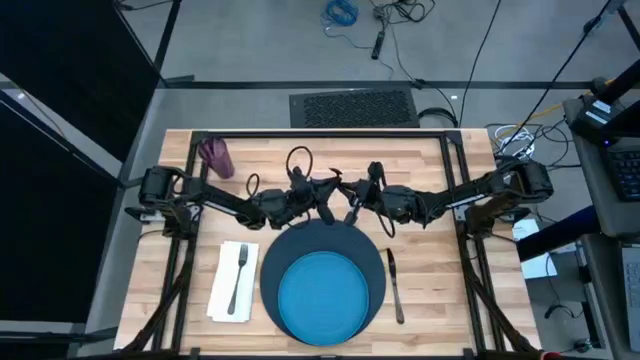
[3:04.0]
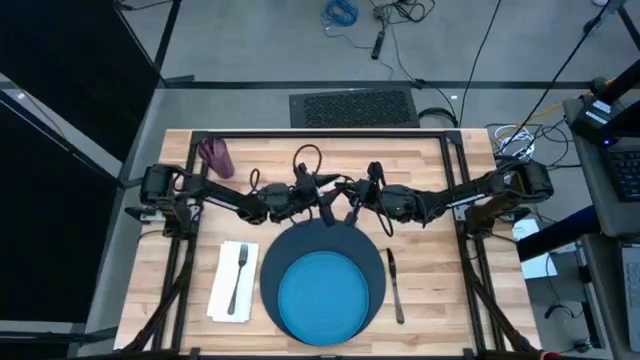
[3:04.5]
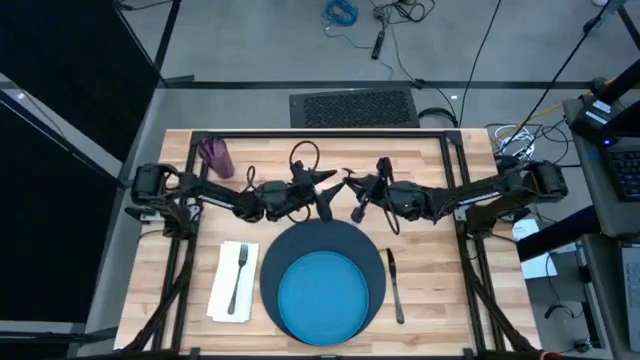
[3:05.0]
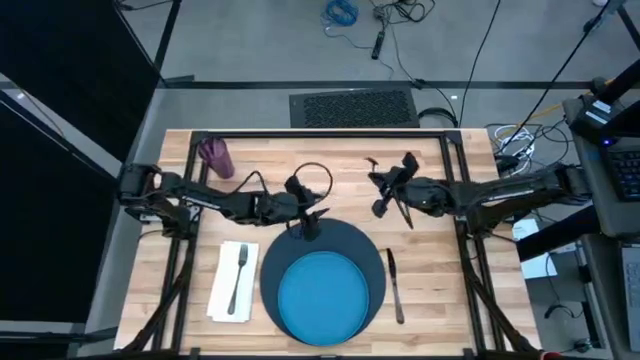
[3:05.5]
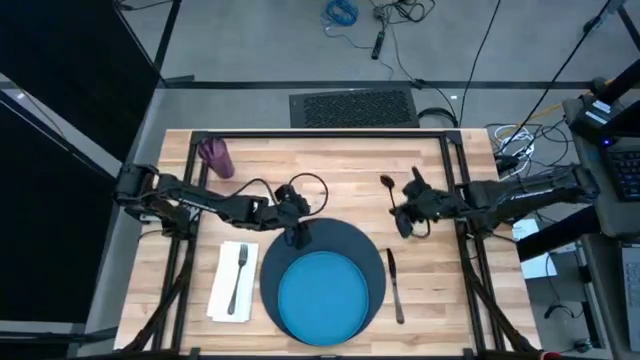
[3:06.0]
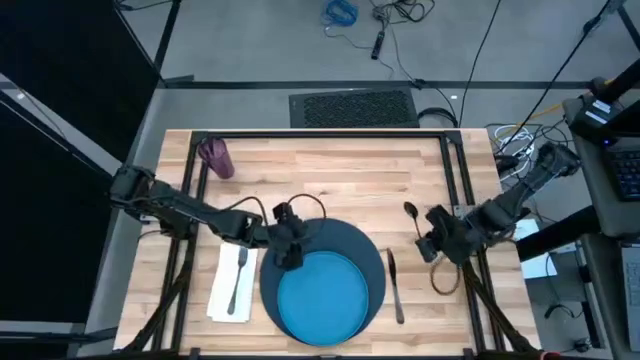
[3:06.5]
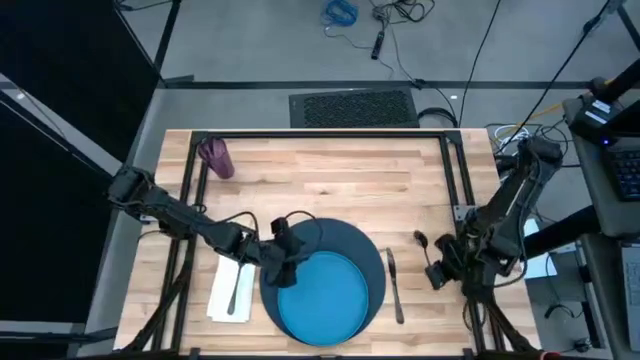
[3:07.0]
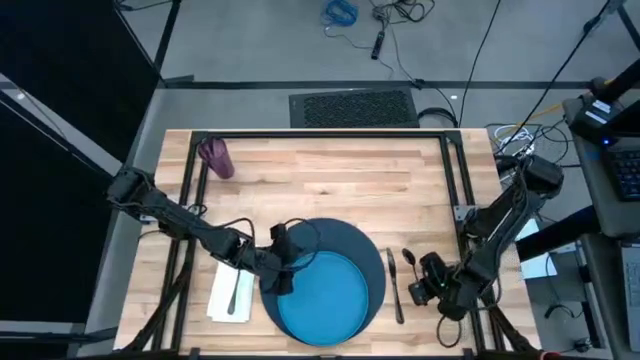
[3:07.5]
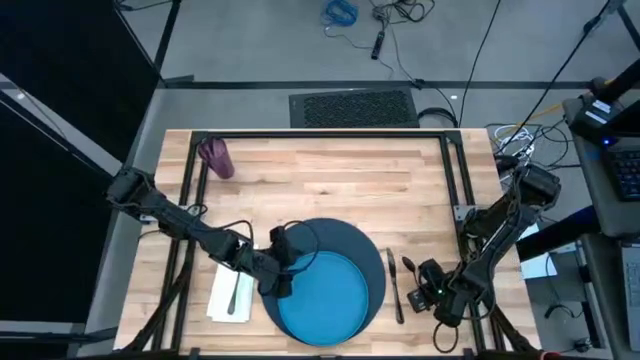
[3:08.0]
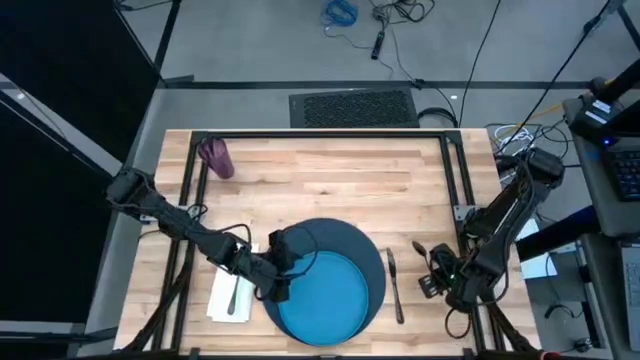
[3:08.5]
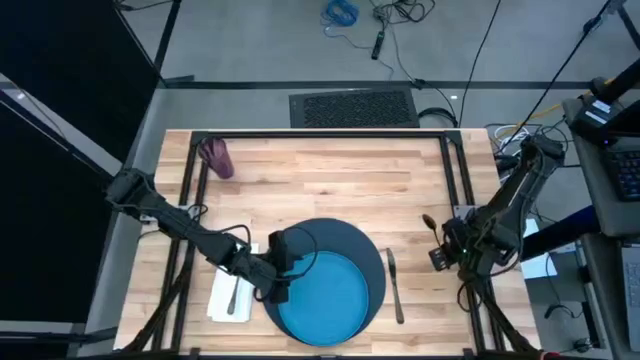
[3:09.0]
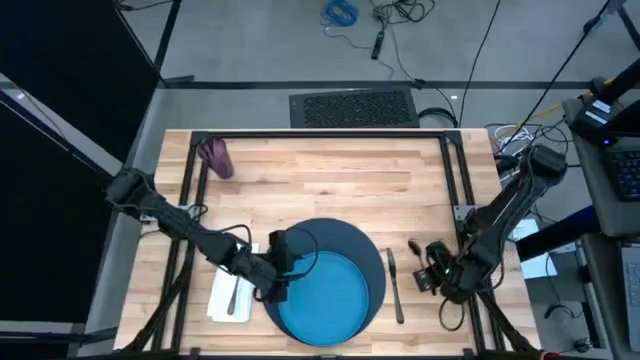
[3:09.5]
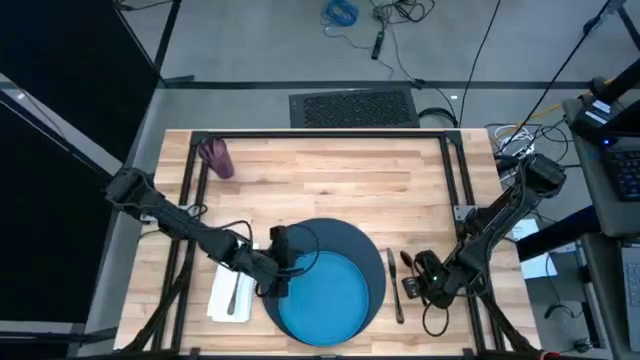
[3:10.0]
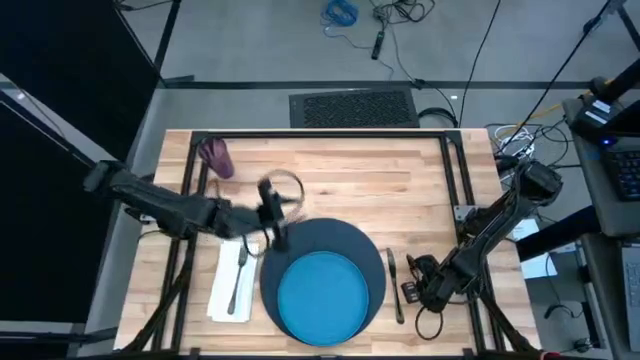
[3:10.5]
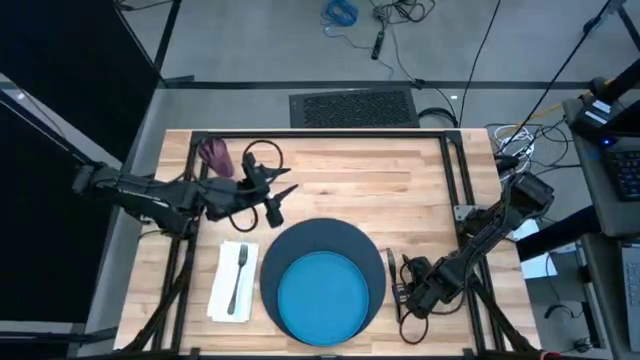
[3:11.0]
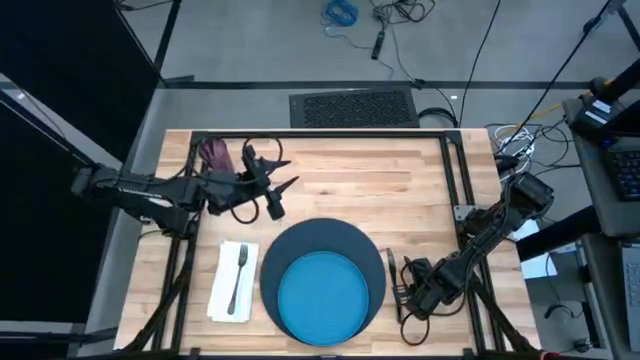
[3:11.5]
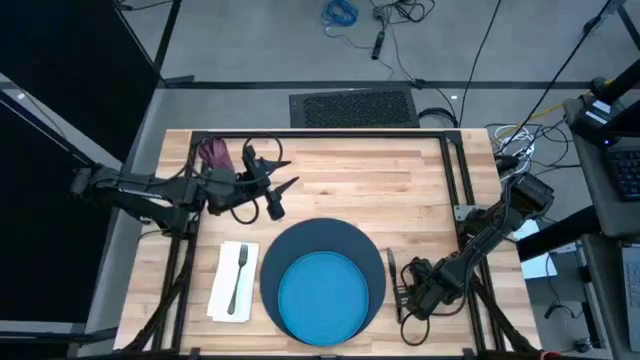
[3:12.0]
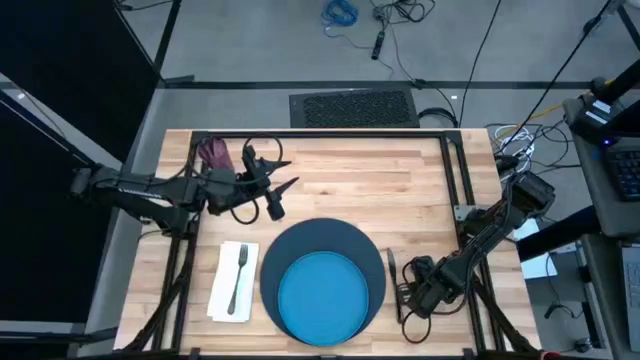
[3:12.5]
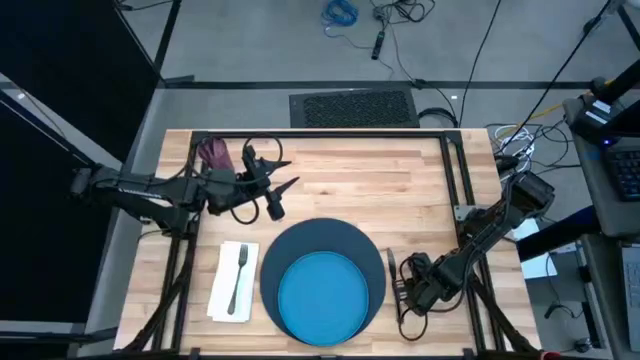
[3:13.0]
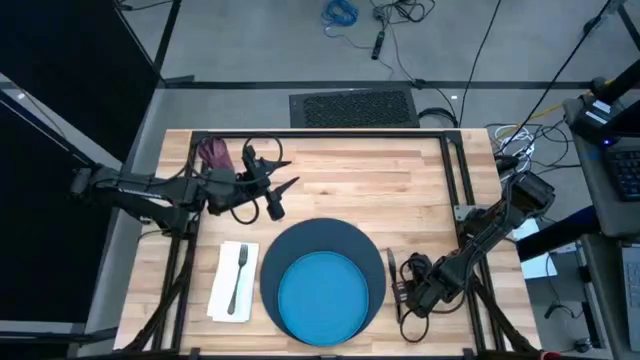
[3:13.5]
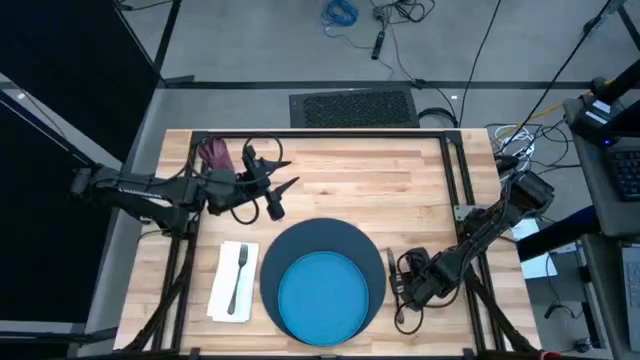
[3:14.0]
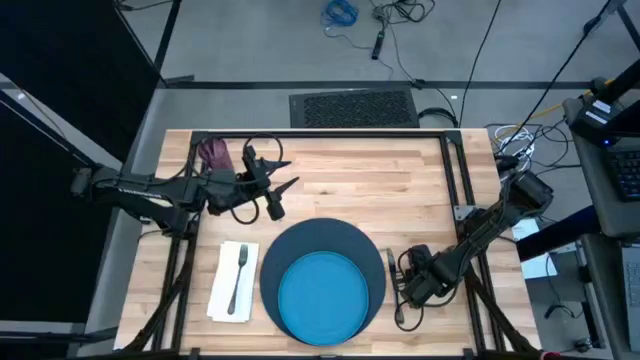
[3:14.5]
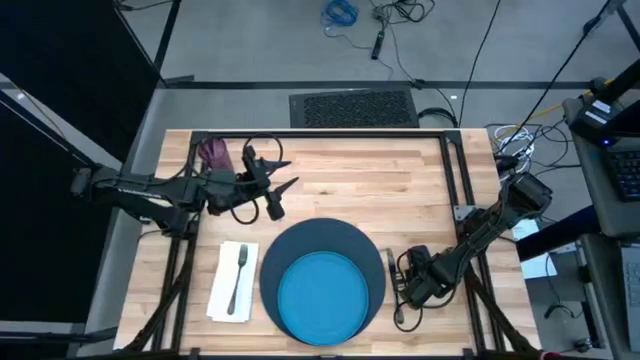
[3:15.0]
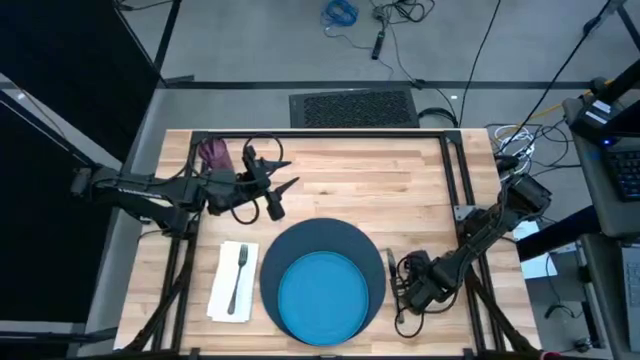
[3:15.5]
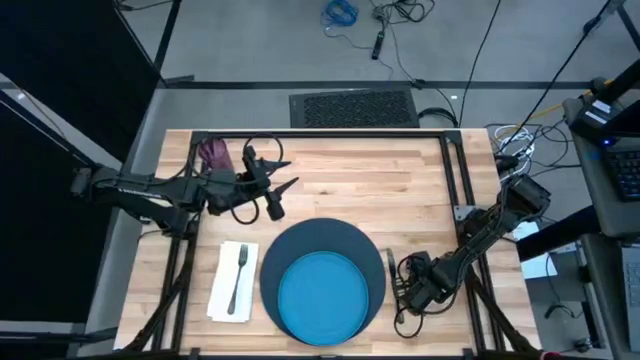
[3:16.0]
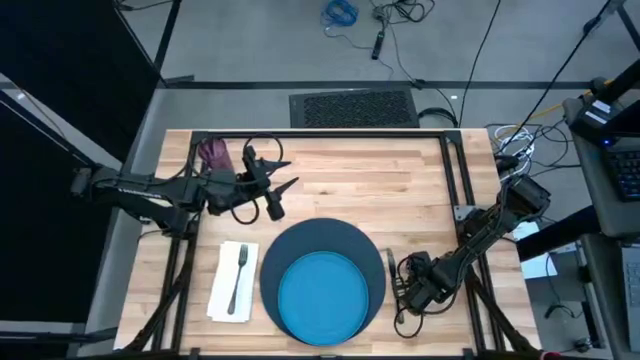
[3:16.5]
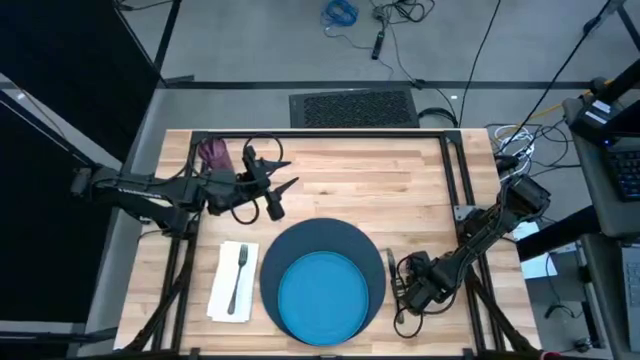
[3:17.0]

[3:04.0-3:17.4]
Task: Set table place
Put the spoon on the right side of the table knife

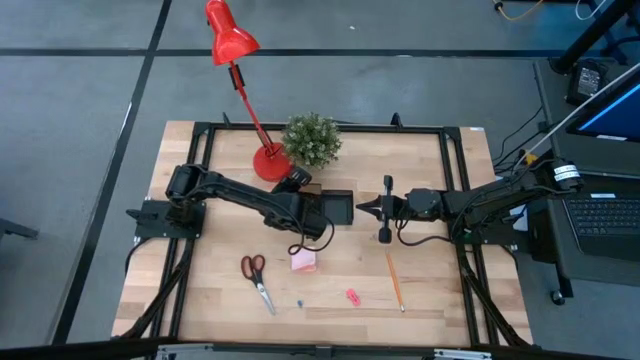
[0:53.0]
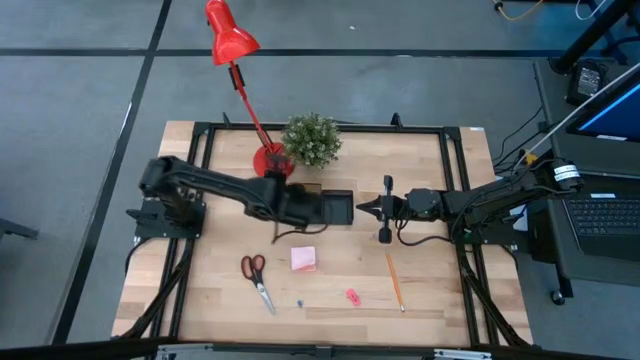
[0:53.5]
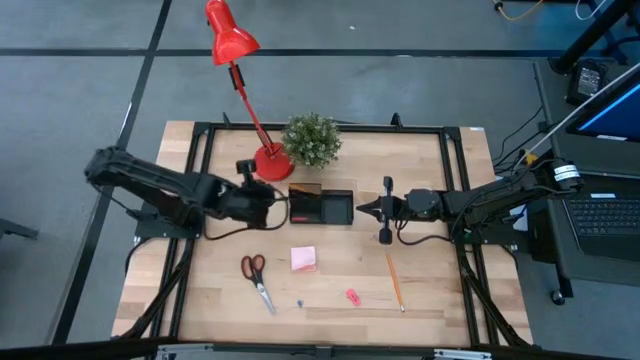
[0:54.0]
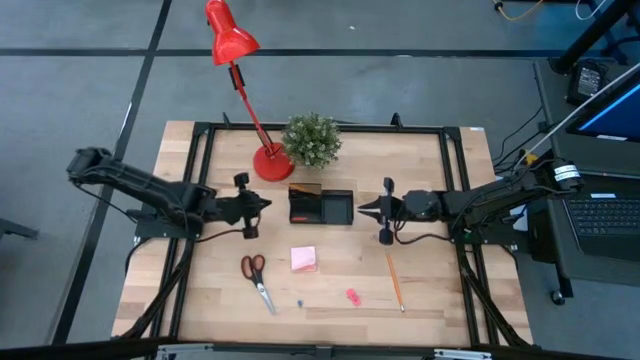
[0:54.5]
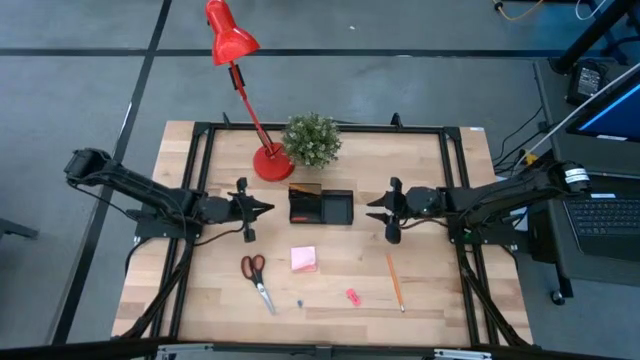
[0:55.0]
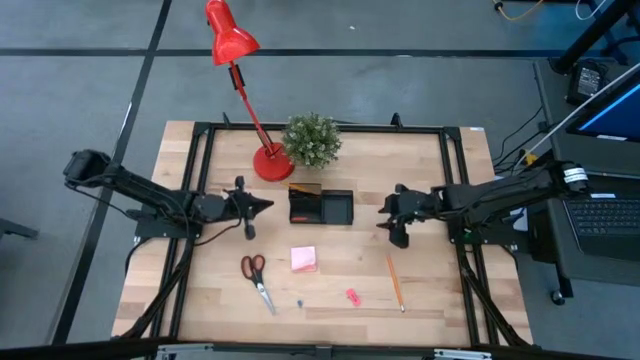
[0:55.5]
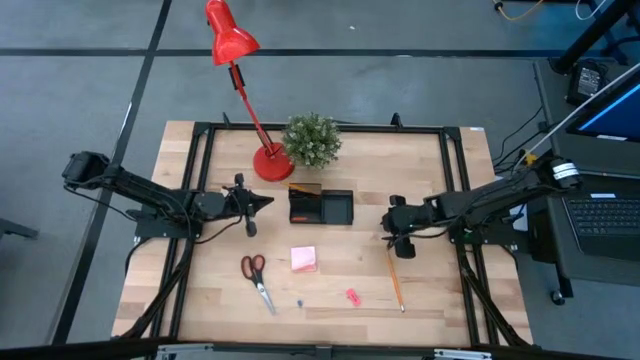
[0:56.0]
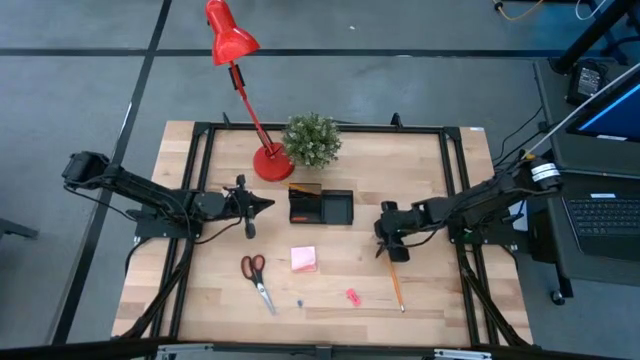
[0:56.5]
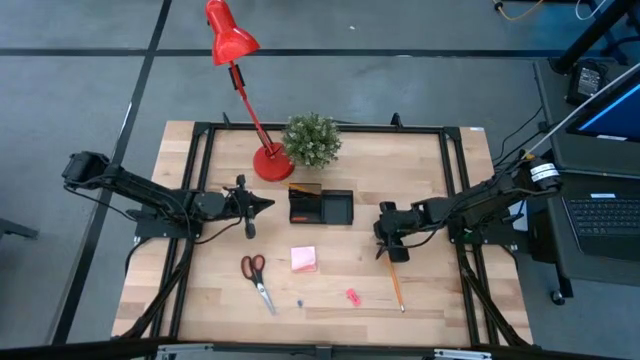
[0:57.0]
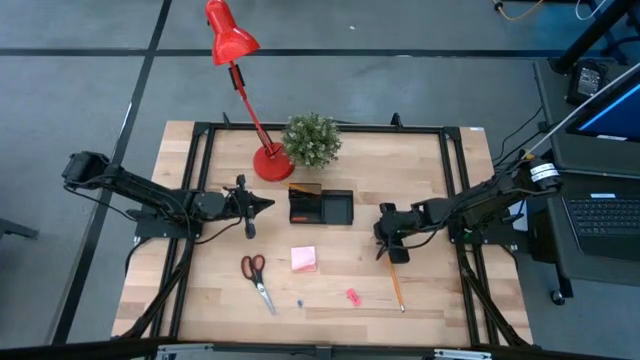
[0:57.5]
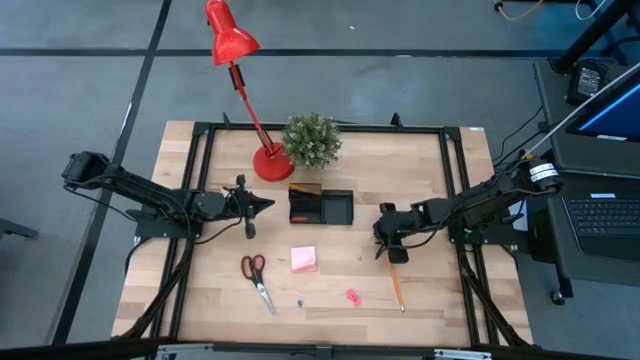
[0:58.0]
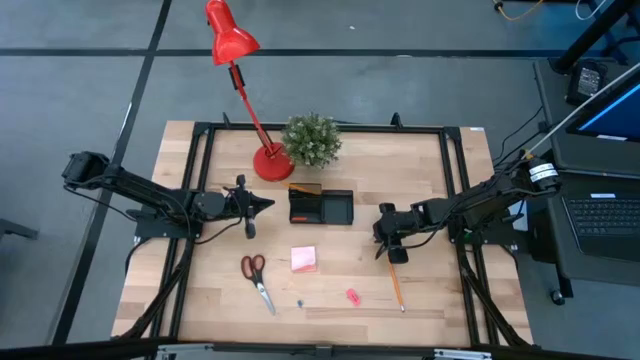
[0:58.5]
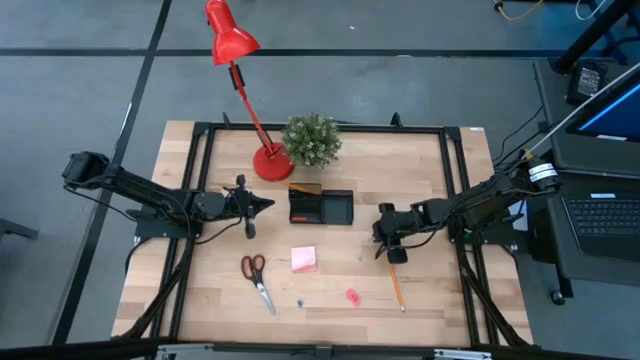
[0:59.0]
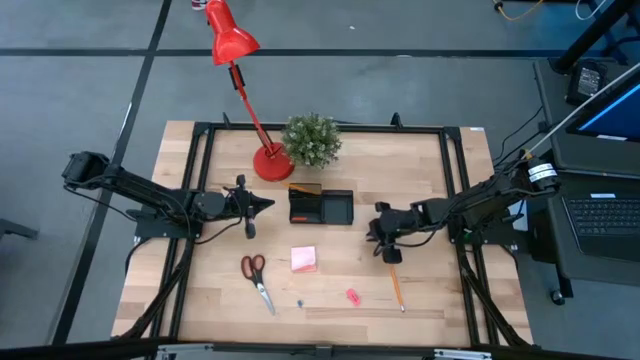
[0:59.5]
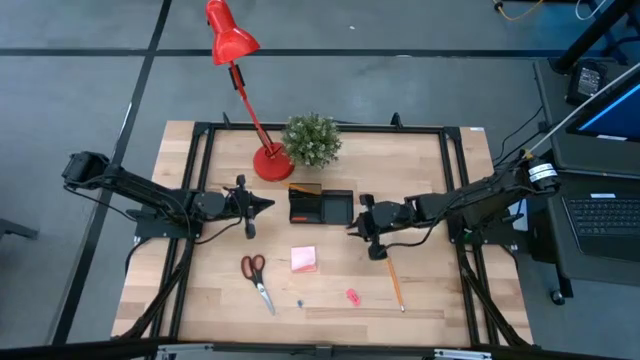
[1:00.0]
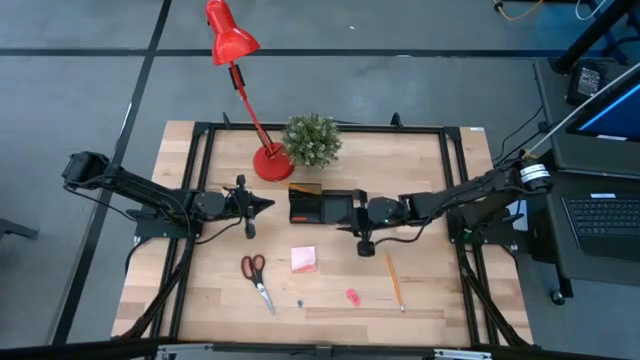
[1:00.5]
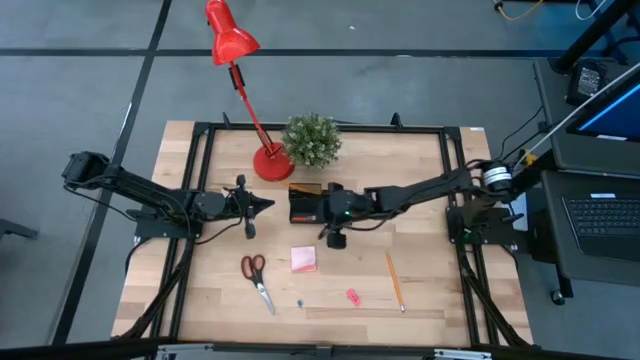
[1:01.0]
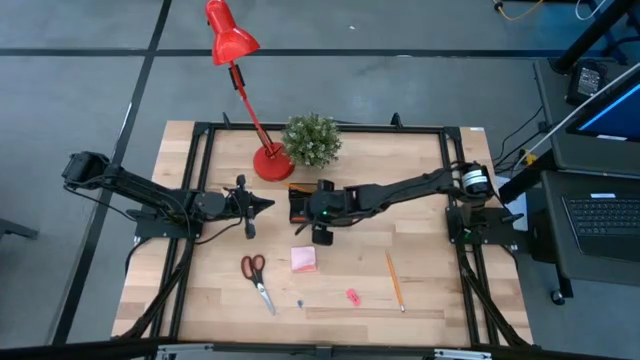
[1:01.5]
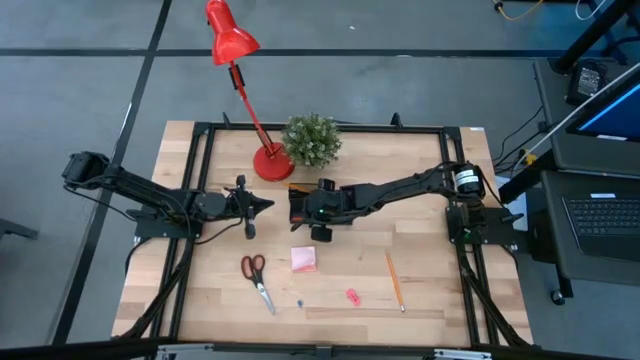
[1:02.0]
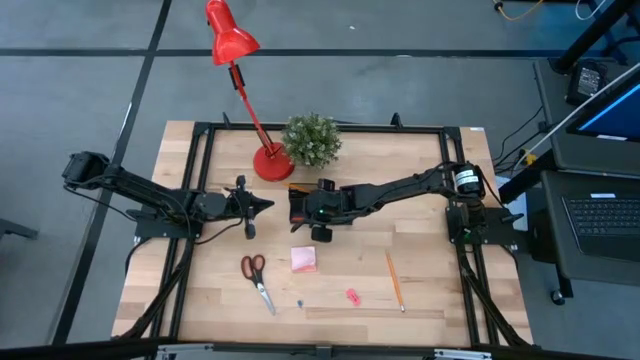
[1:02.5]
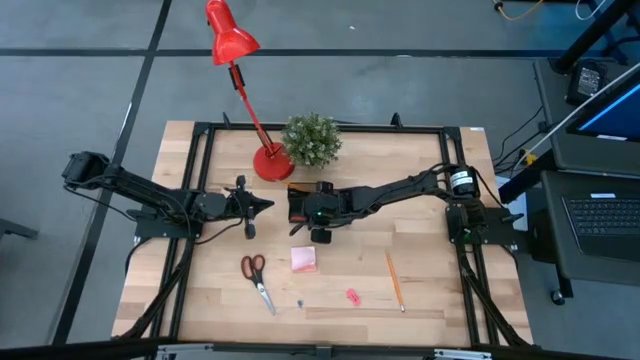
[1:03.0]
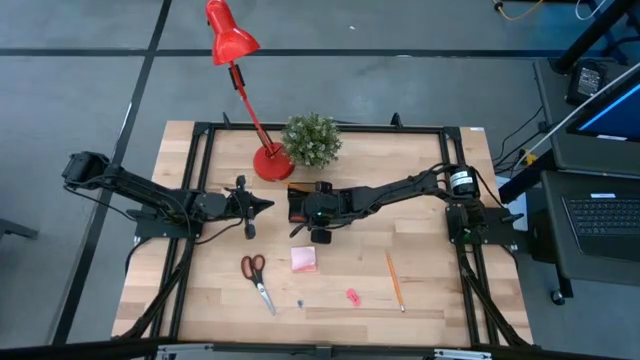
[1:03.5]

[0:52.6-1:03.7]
Task: Pick and place office supplies into organizer
Put the pink binder clip into the black desk organizer
